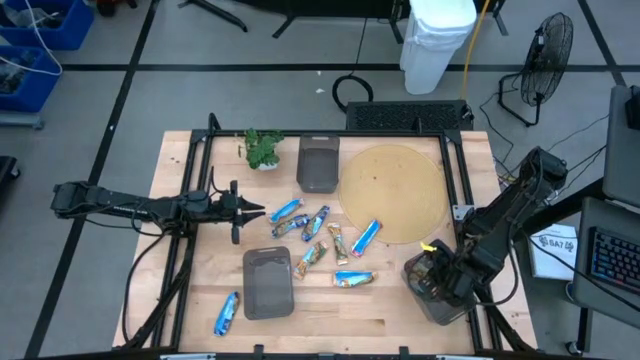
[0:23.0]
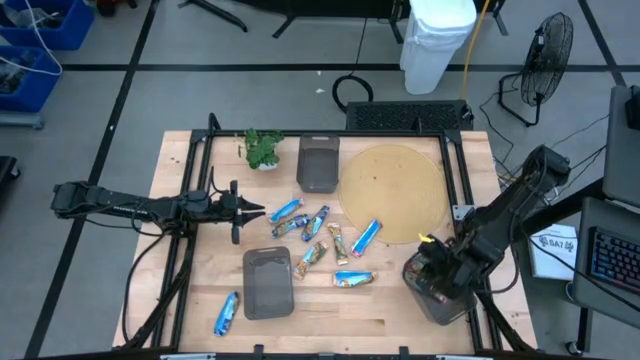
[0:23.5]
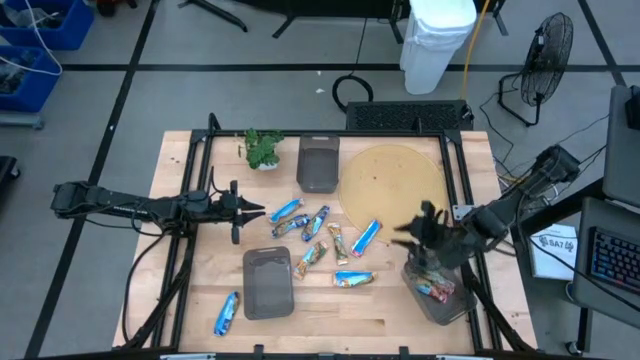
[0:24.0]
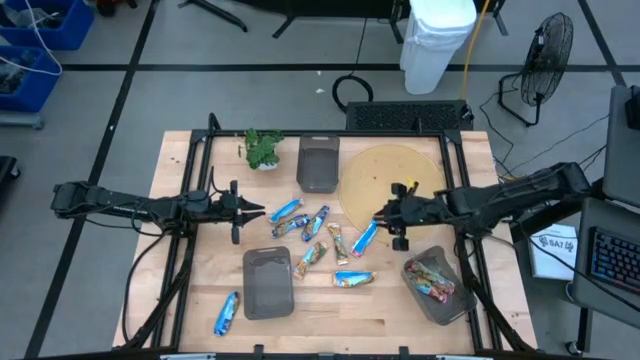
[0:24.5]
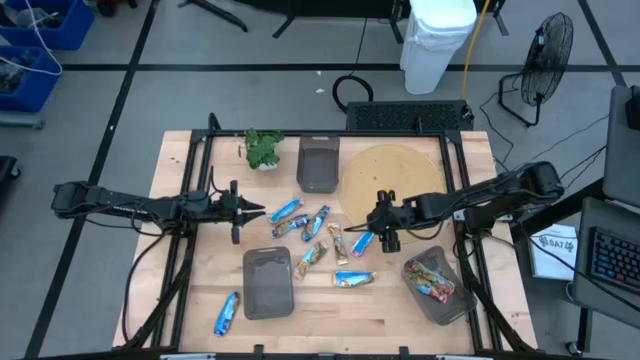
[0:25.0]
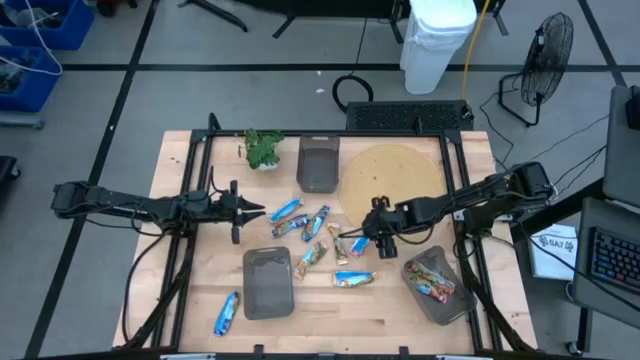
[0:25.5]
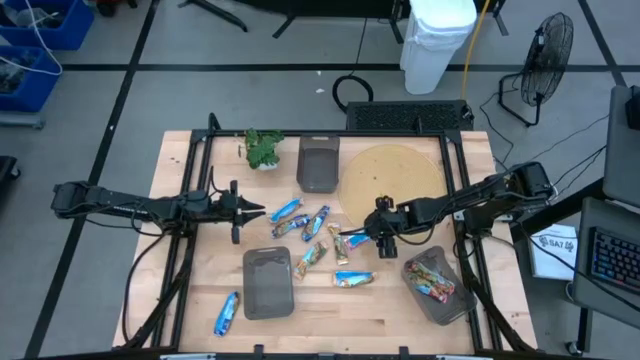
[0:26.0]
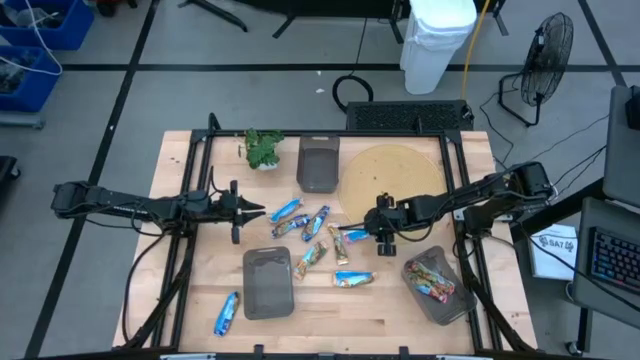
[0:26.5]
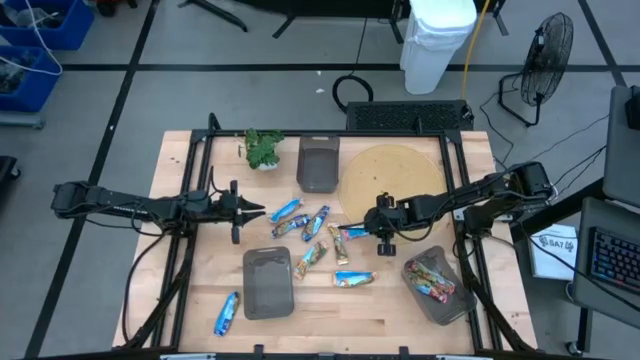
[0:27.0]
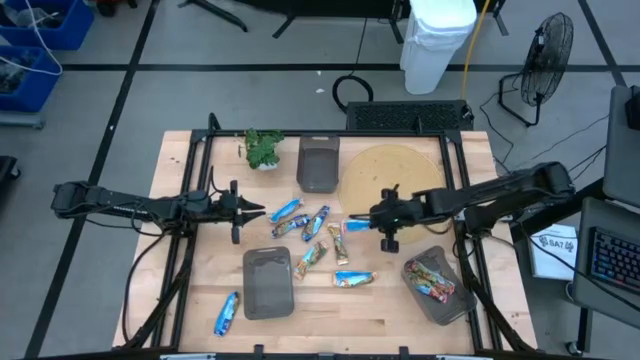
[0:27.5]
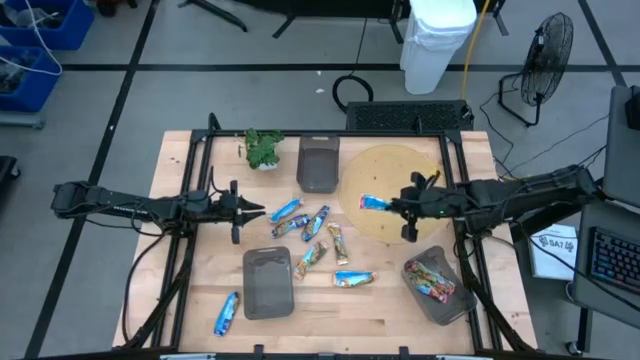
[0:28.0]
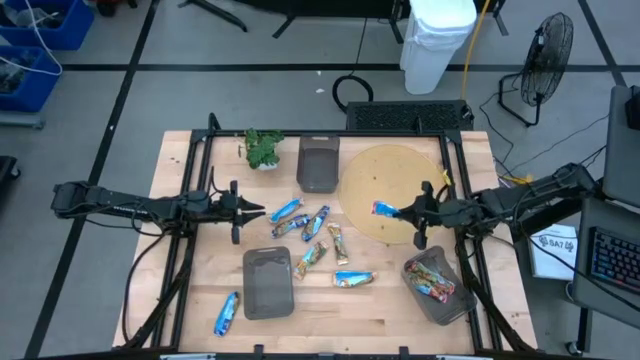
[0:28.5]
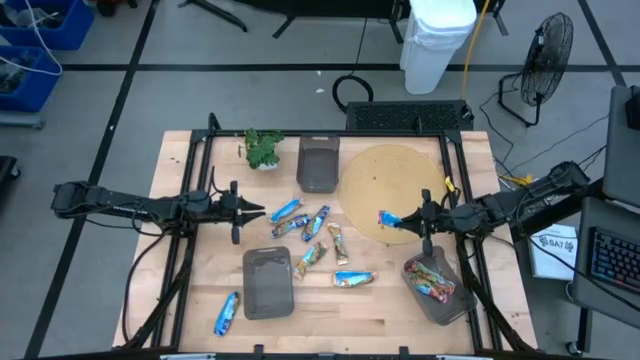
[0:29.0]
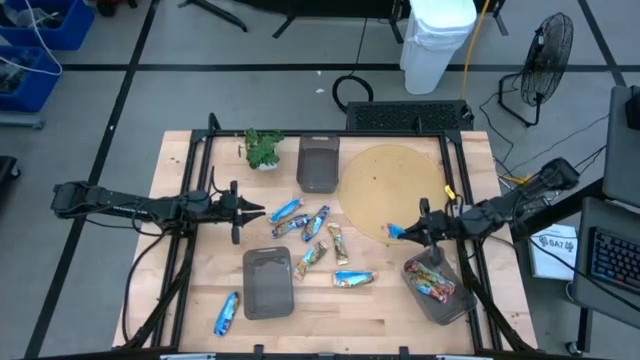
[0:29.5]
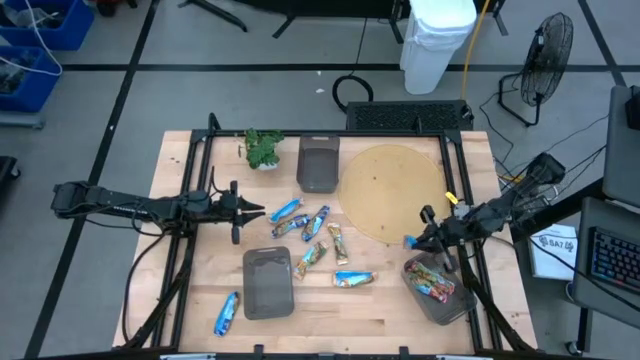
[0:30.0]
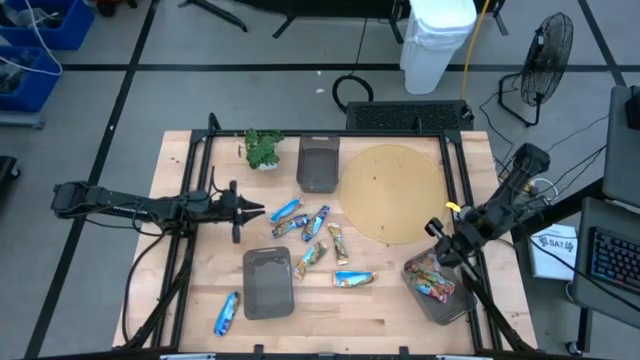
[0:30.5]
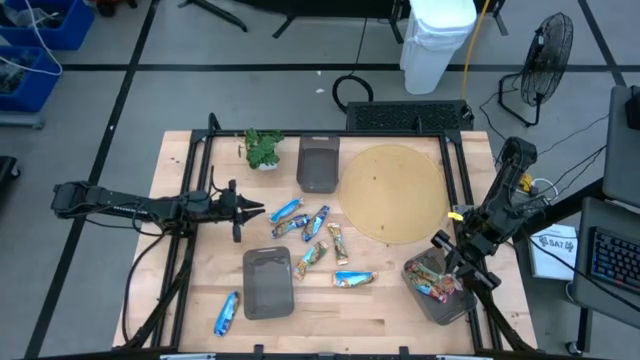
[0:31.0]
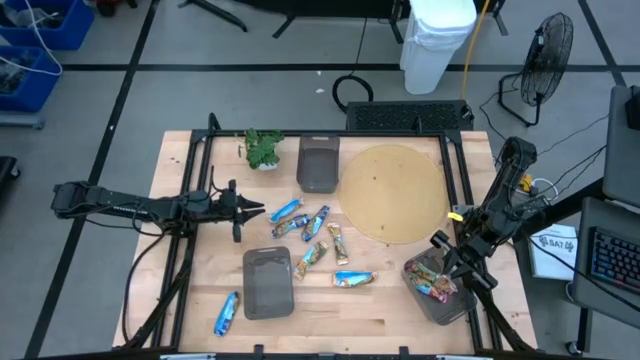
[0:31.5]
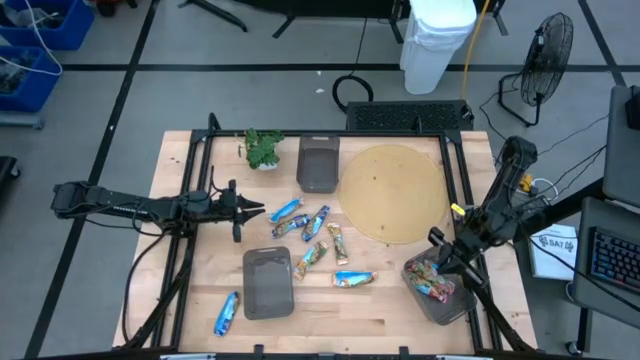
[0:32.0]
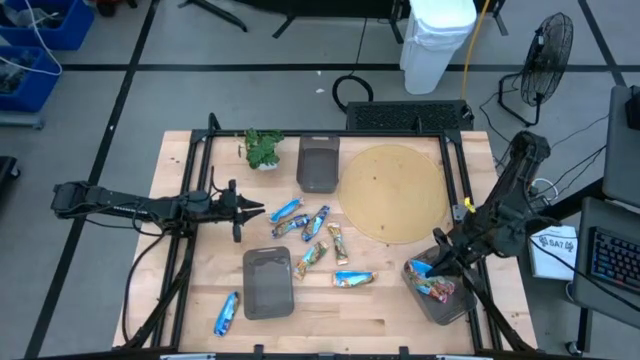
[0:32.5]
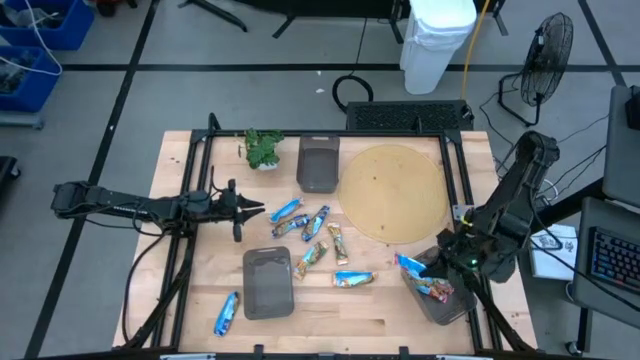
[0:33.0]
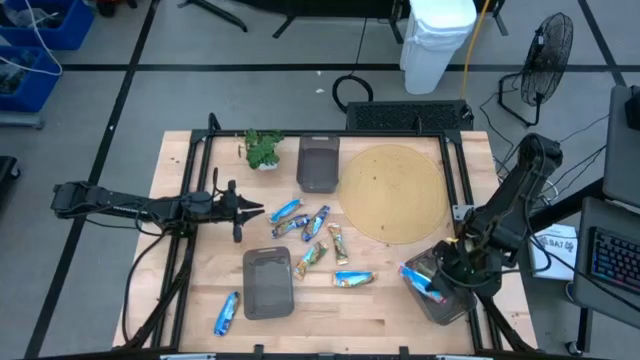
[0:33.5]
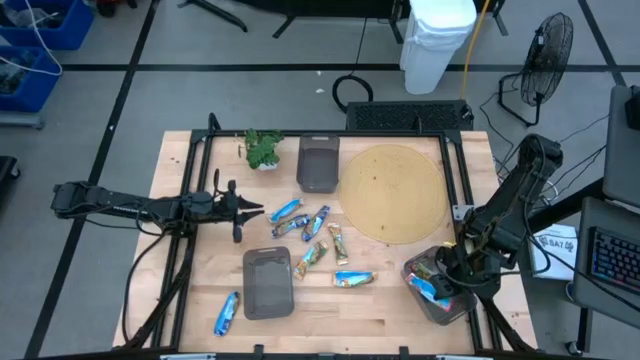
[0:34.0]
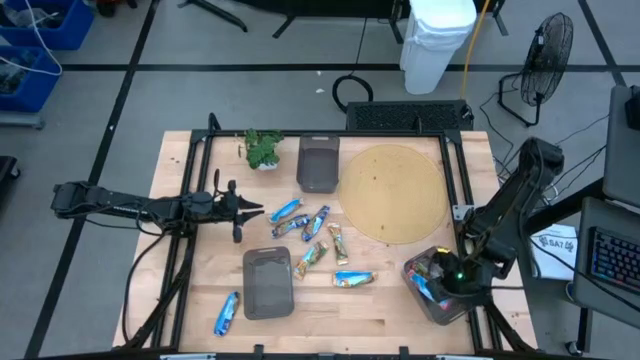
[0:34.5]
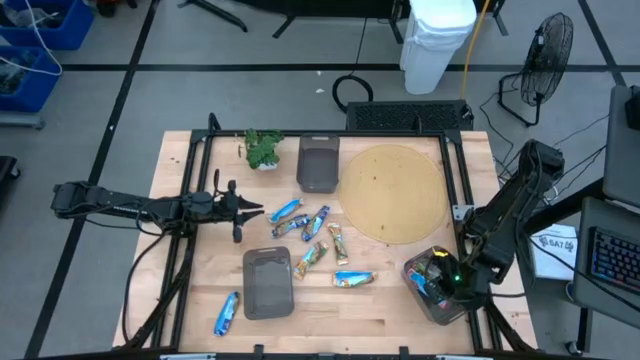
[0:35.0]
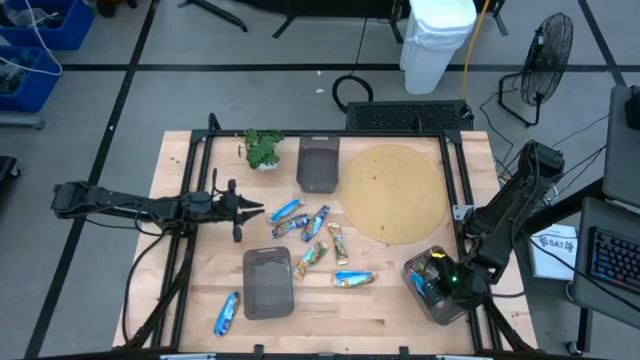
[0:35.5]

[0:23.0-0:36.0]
Task: Pick and place Granola Bars by type
Put the red granola bar into the bottom right black bin

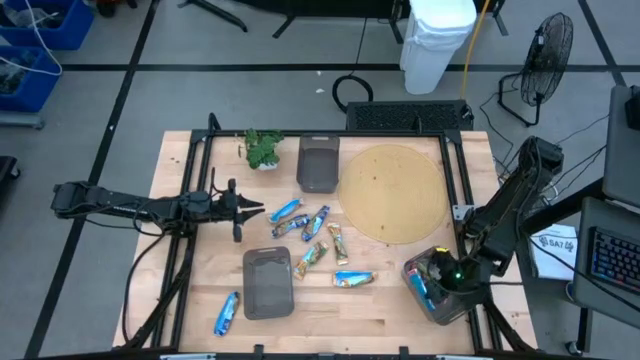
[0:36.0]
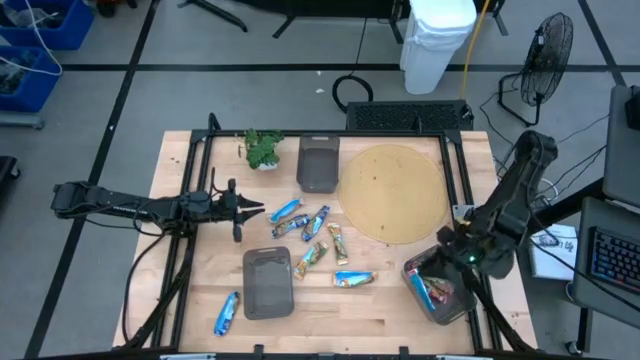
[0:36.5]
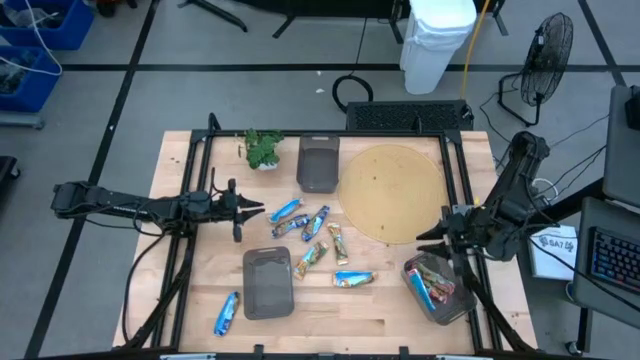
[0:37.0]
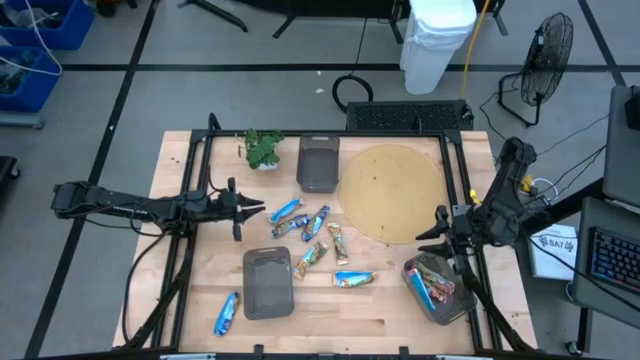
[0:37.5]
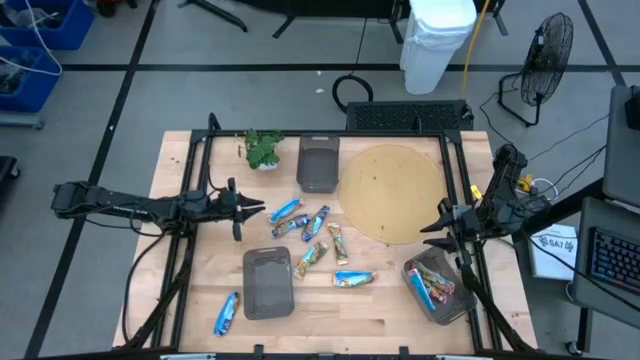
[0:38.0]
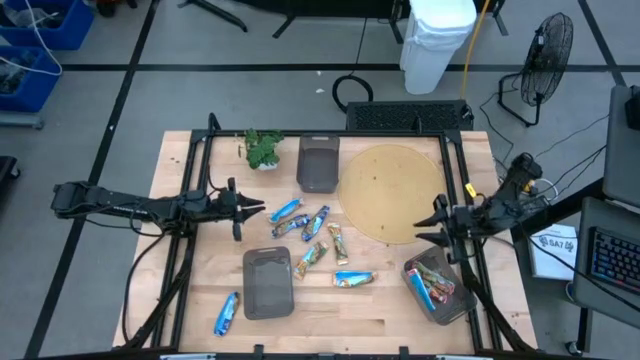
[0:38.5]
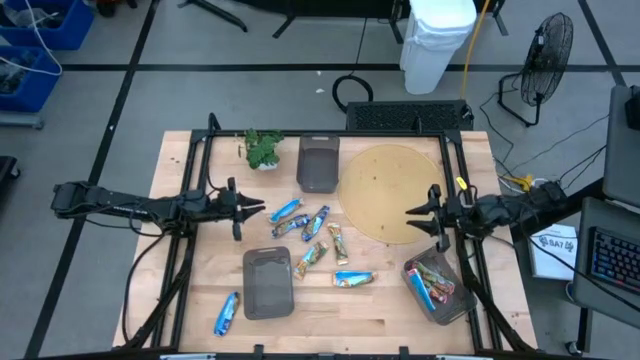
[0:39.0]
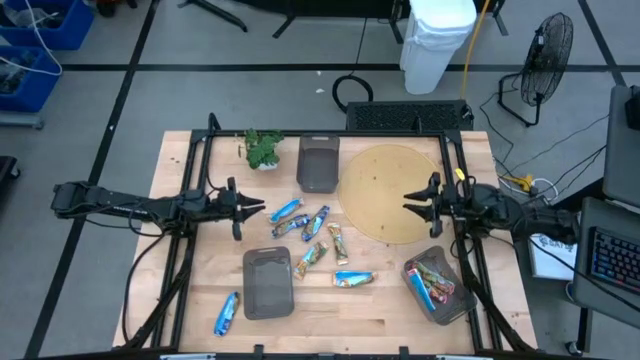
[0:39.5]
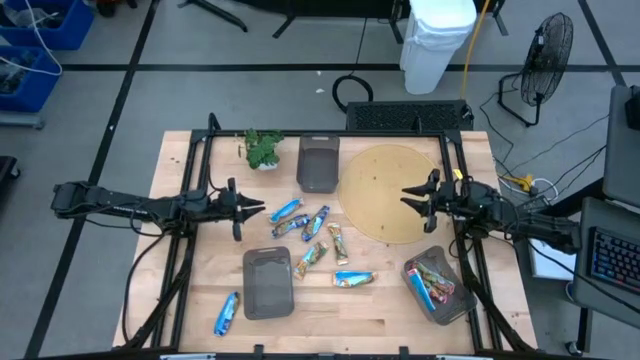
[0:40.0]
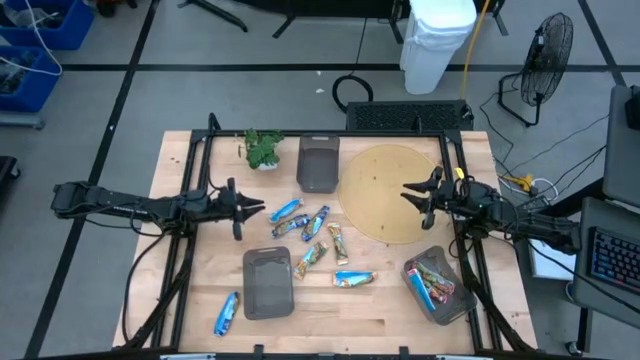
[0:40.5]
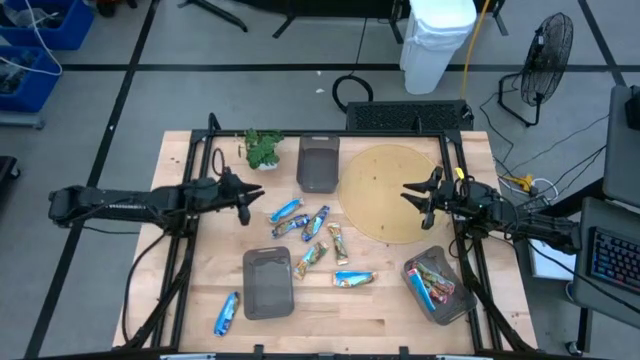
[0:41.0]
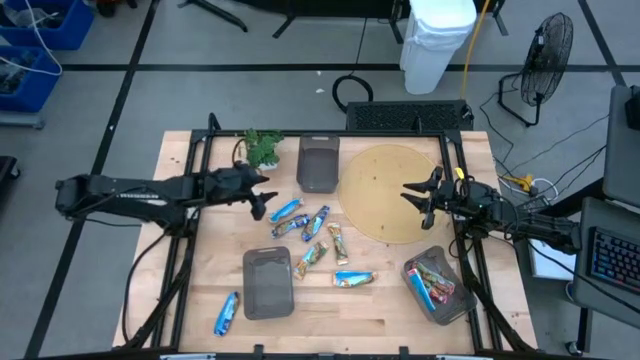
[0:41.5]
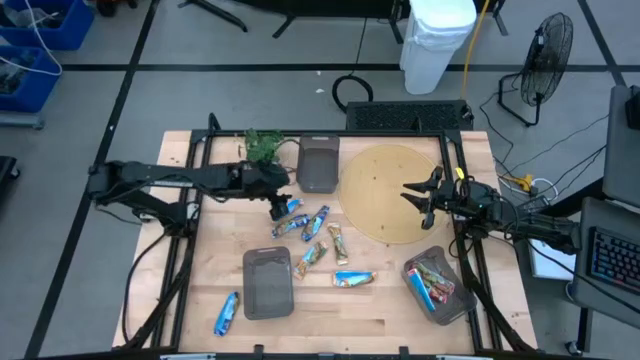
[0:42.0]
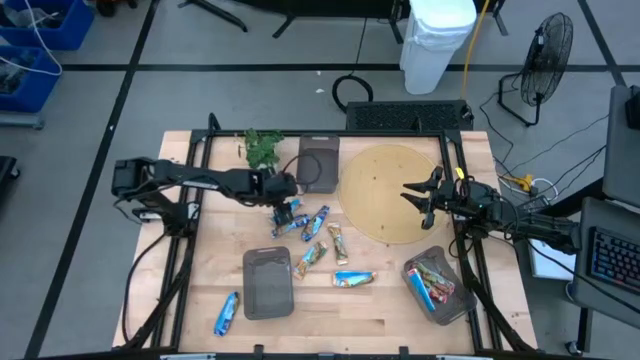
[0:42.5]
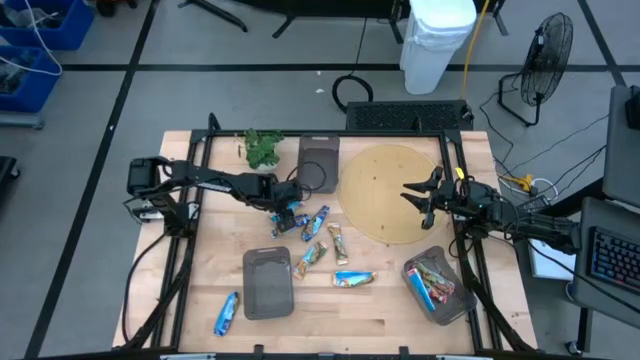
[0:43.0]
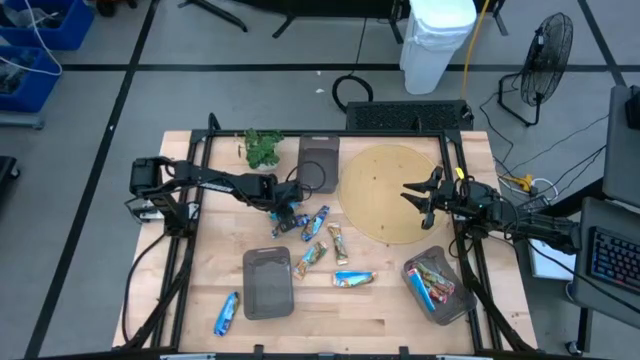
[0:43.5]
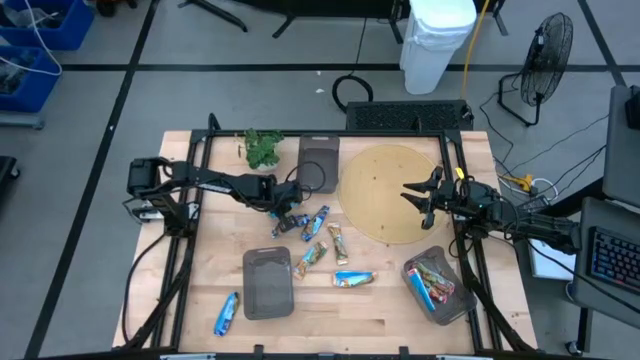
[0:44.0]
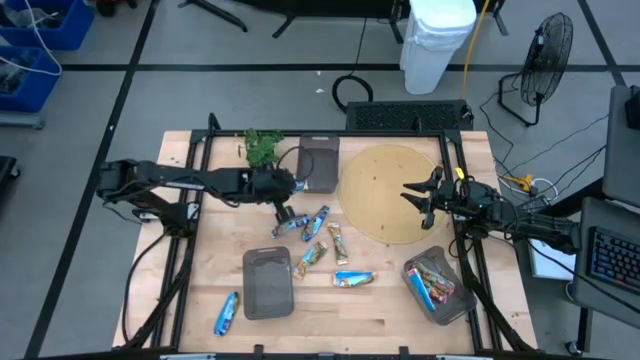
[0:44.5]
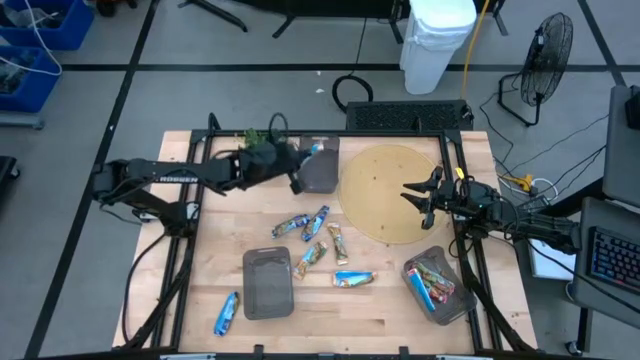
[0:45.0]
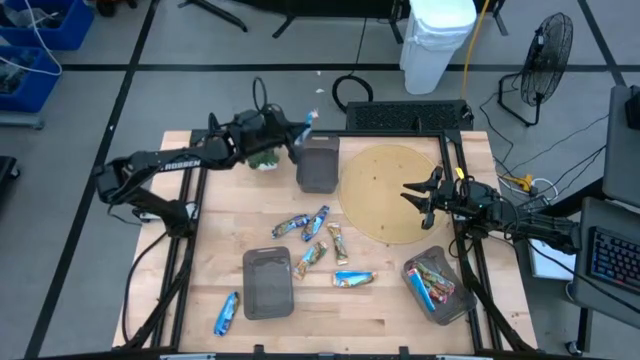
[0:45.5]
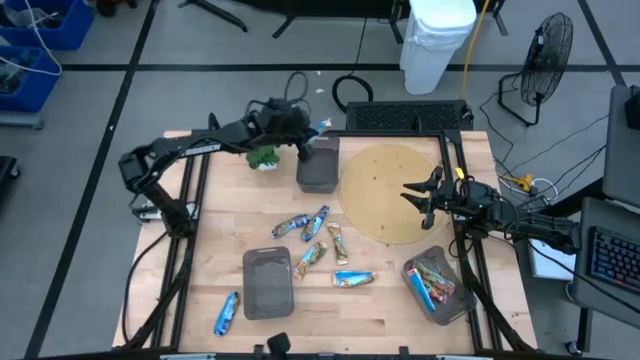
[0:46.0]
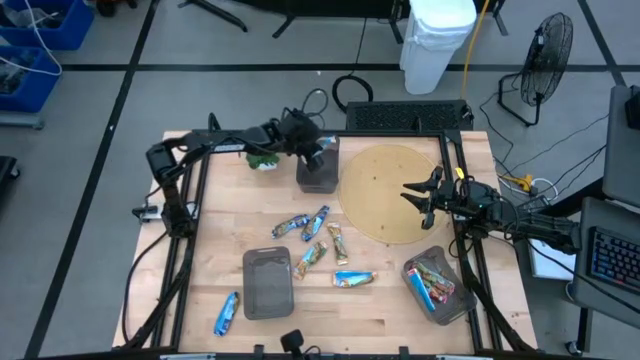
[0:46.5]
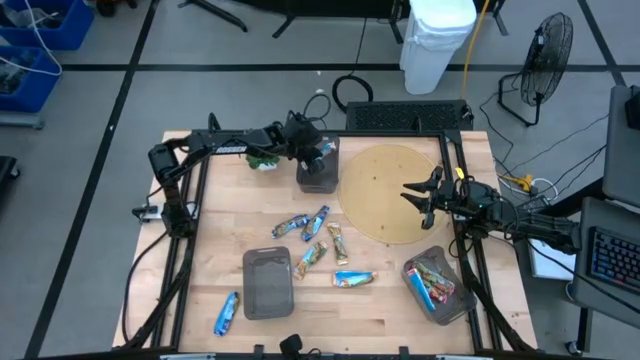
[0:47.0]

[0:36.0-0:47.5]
Put the yellow granola bar into the top black bin
